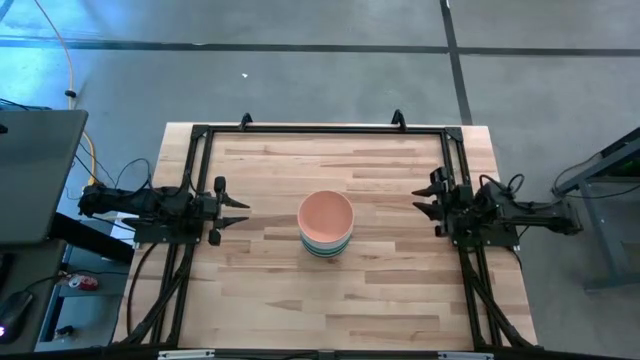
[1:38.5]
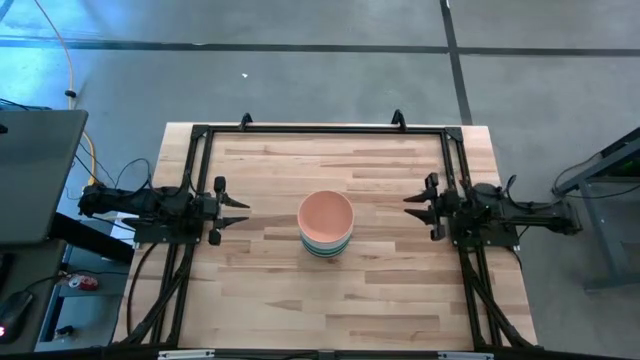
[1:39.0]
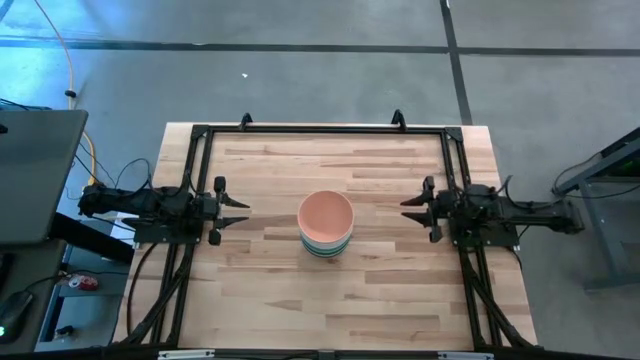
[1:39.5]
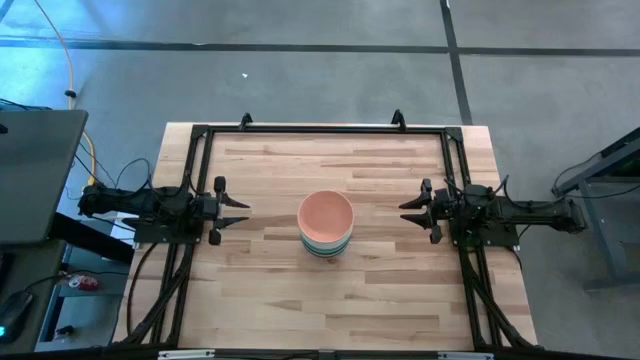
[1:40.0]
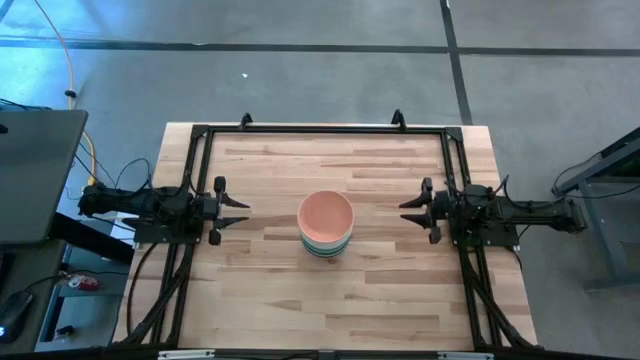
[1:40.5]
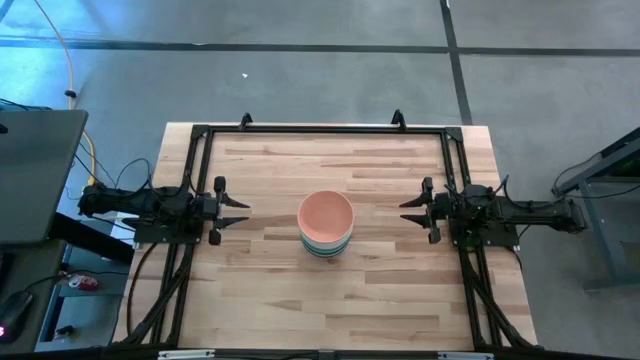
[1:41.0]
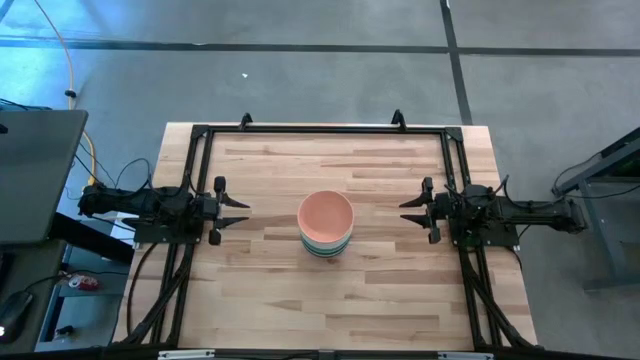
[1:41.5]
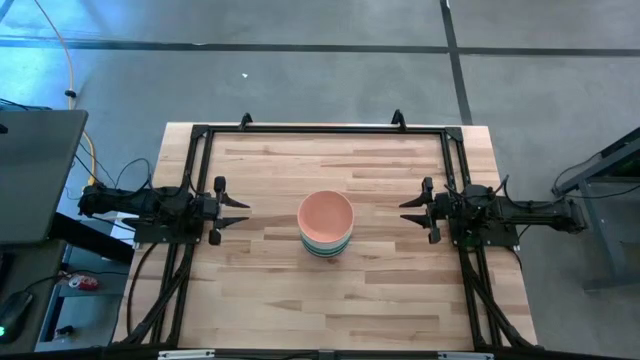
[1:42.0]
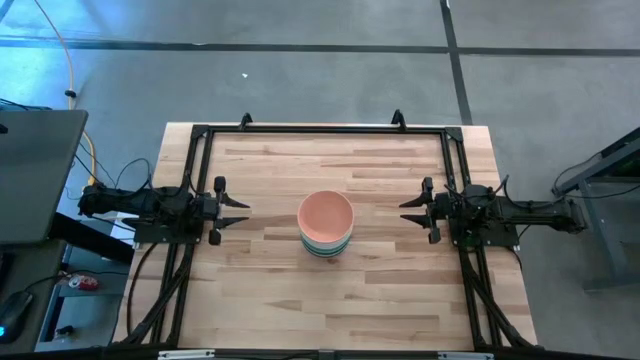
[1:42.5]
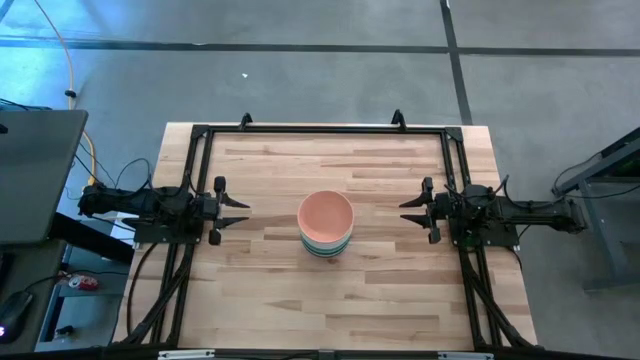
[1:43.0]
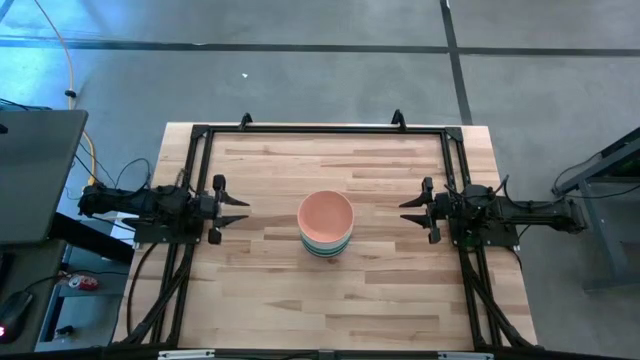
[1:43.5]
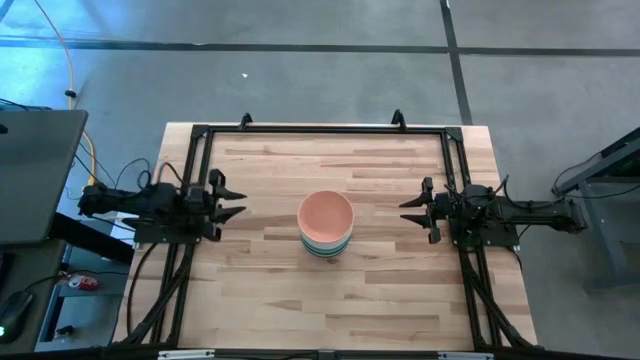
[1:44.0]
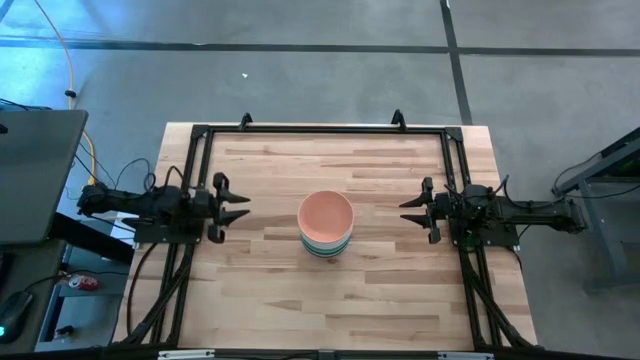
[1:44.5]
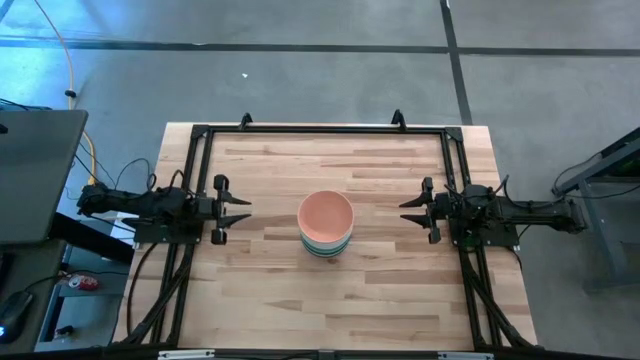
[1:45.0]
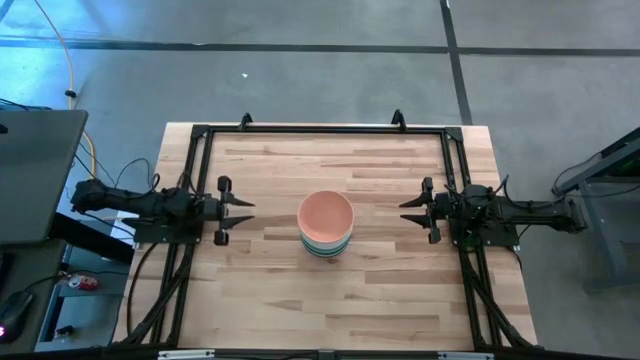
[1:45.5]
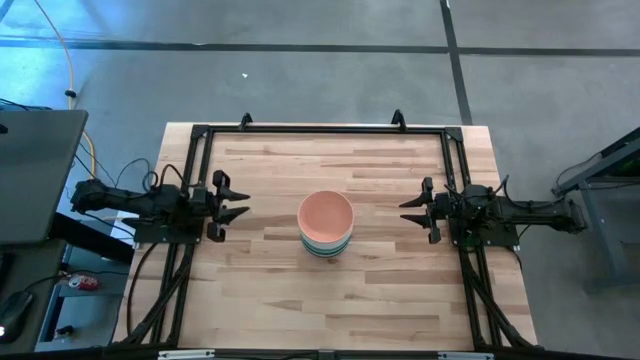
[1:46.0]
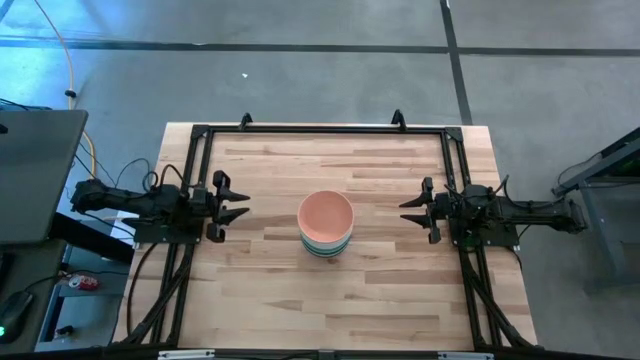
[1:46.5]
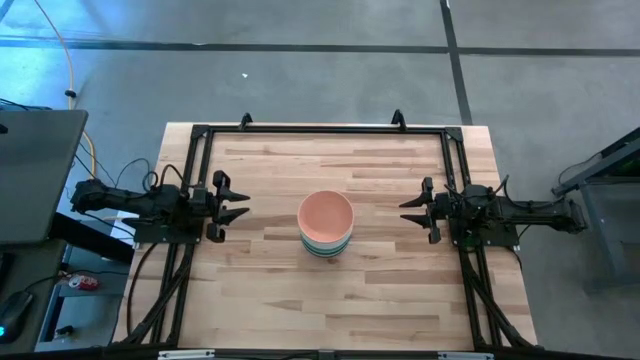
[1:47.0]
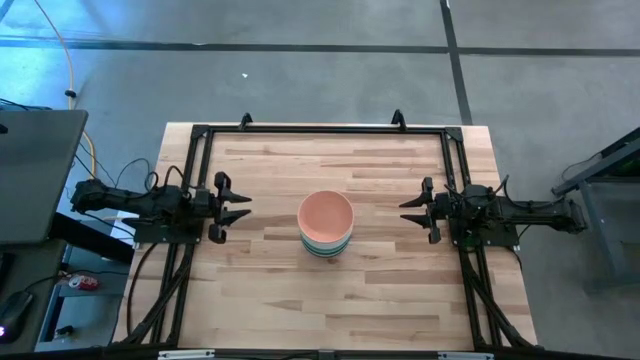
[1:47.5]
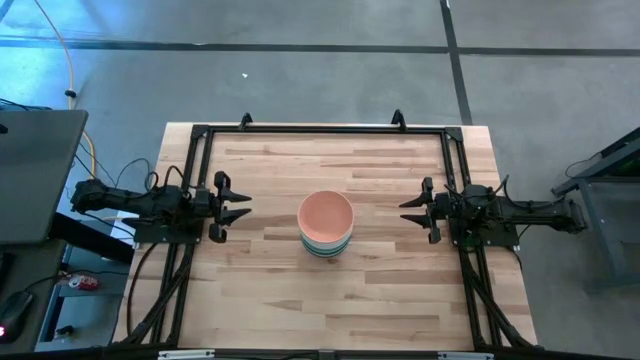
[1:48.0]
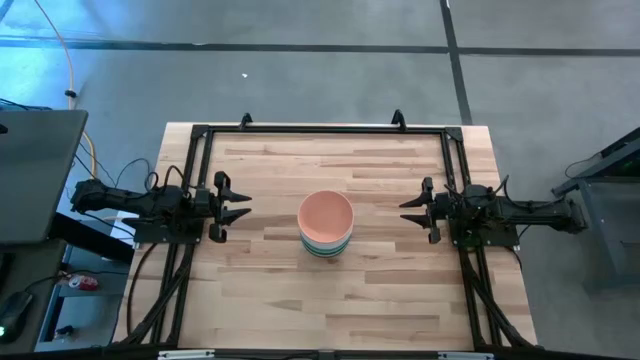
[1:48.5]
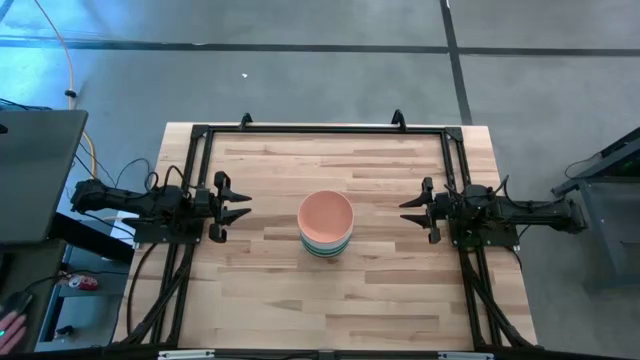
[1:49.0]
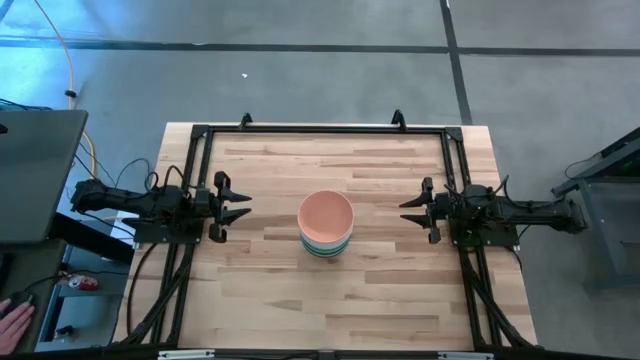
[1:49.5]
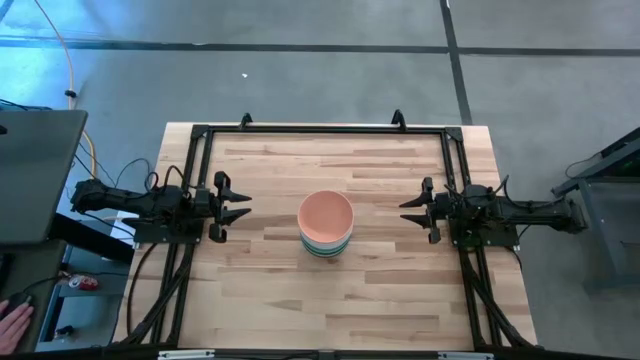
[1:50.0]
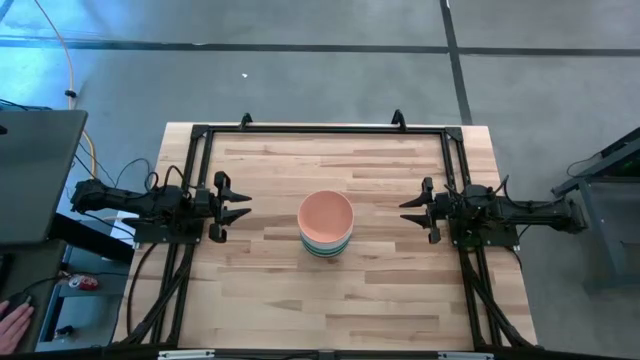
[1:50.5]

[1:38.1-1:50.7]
Task: Nest bowls inside each other
Return to Home Position

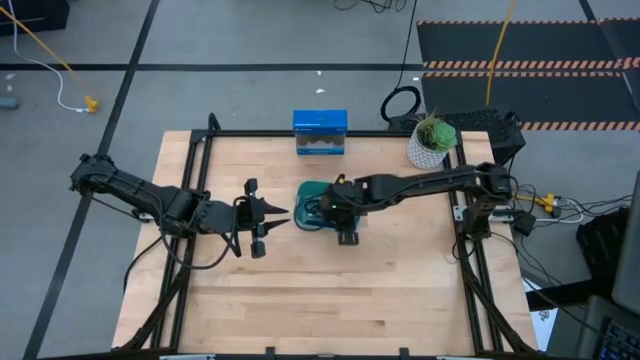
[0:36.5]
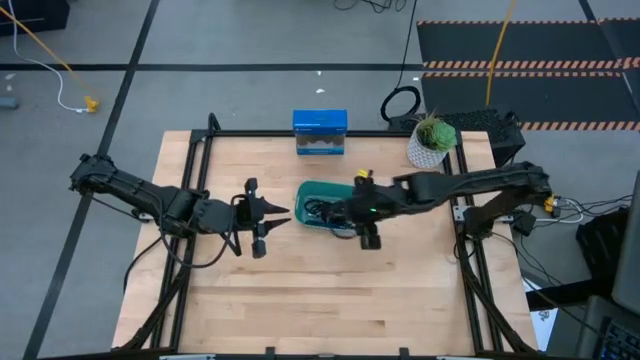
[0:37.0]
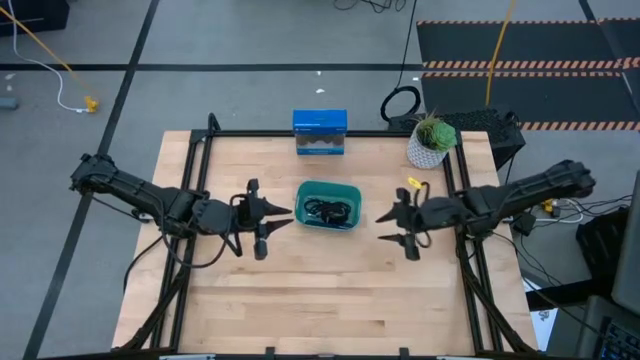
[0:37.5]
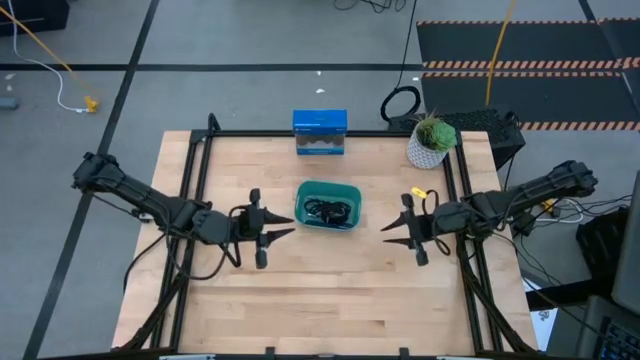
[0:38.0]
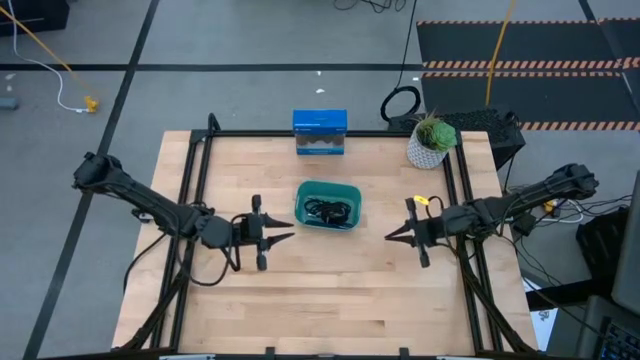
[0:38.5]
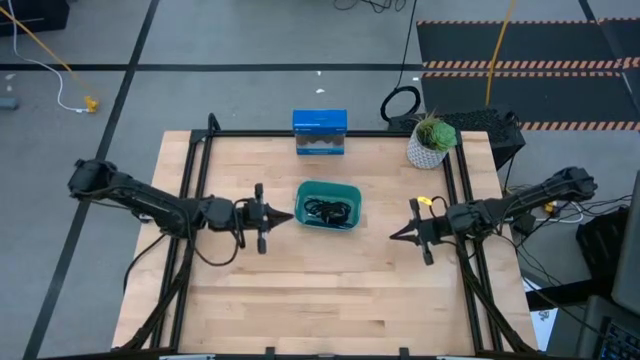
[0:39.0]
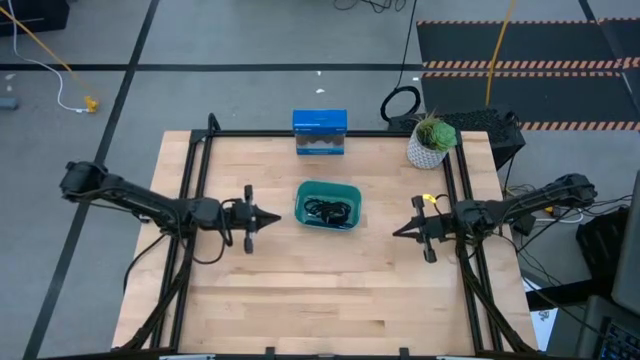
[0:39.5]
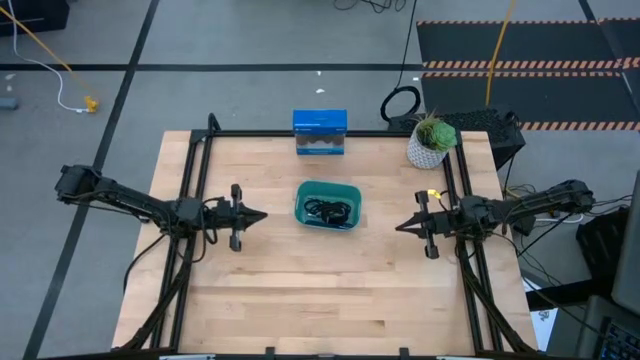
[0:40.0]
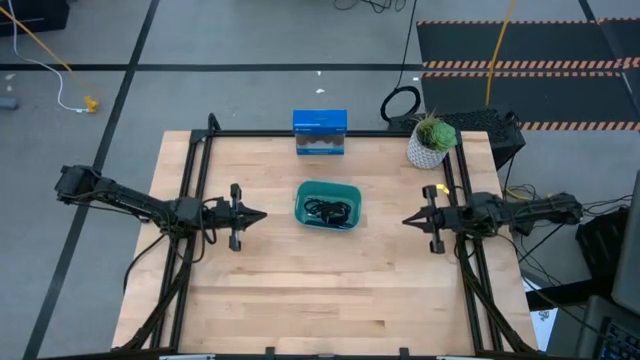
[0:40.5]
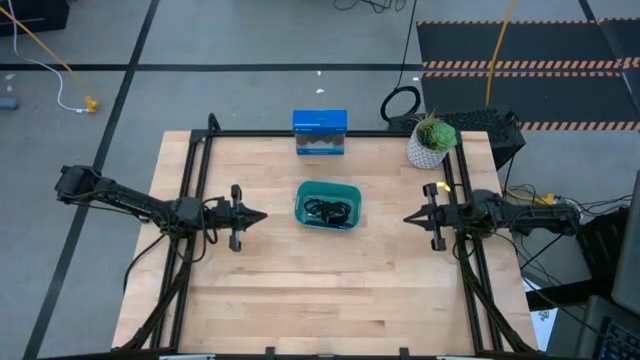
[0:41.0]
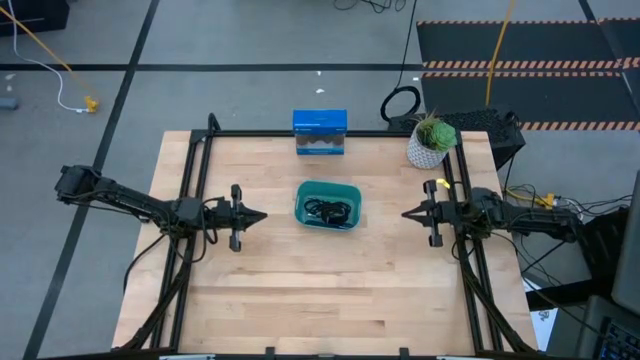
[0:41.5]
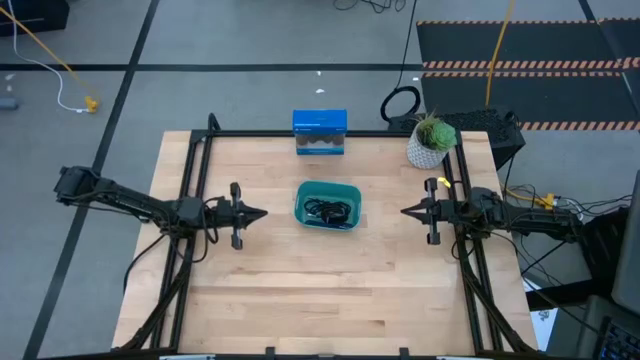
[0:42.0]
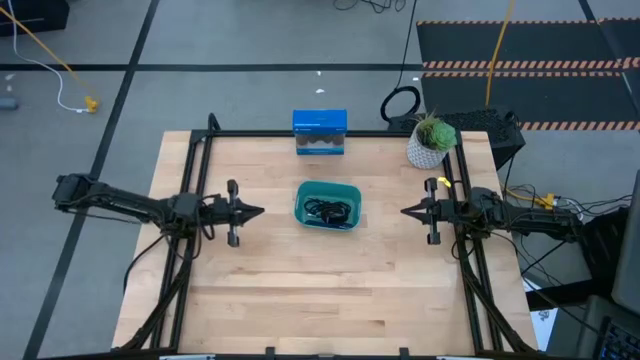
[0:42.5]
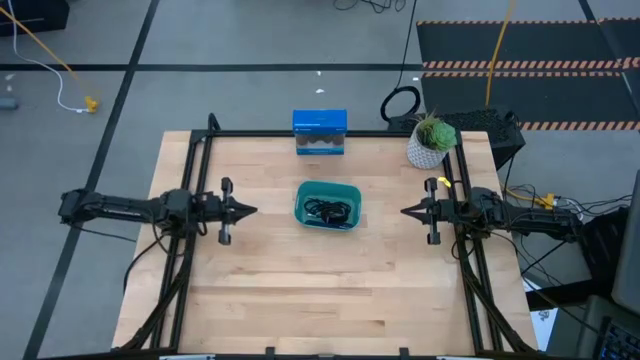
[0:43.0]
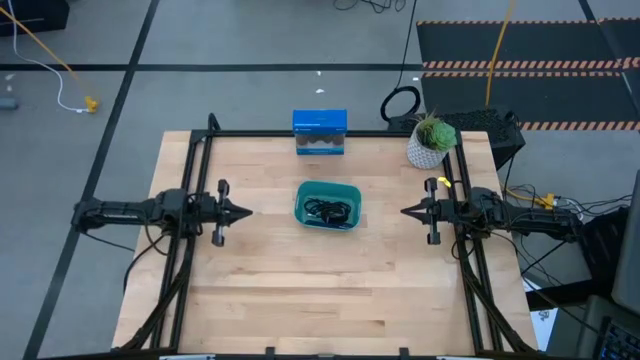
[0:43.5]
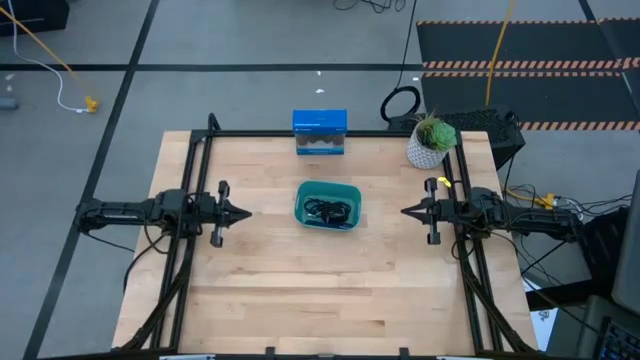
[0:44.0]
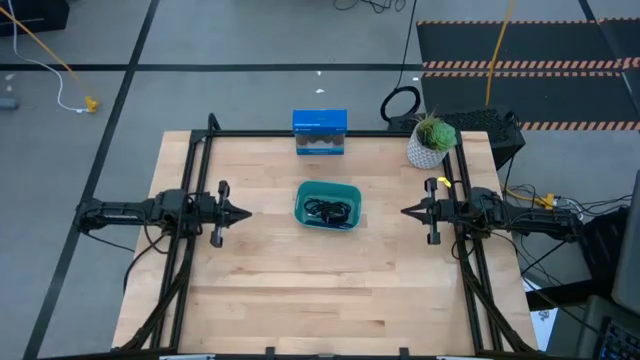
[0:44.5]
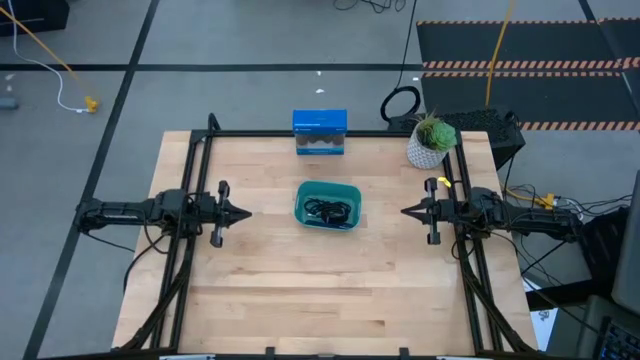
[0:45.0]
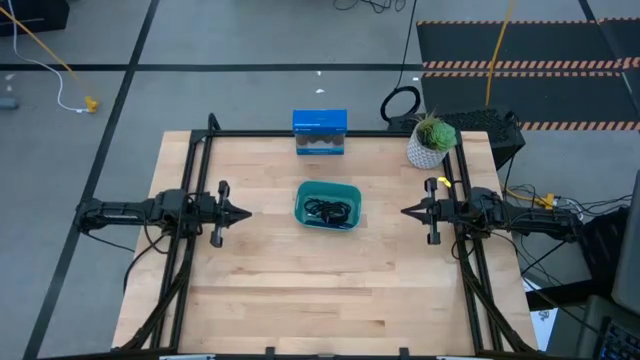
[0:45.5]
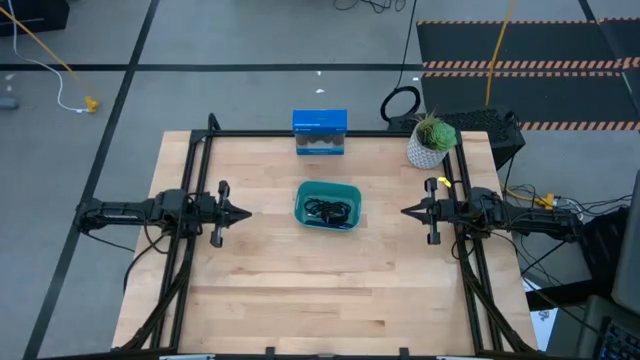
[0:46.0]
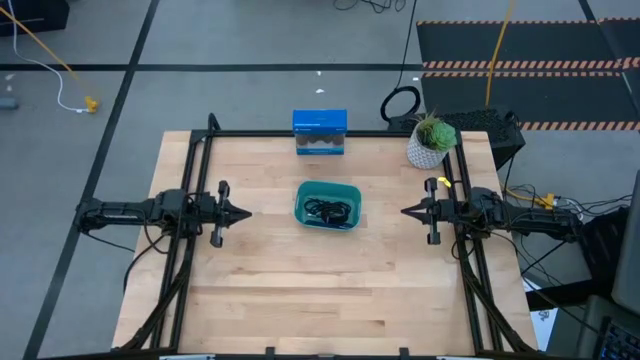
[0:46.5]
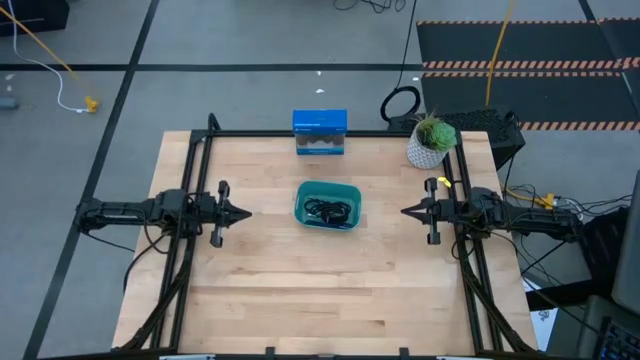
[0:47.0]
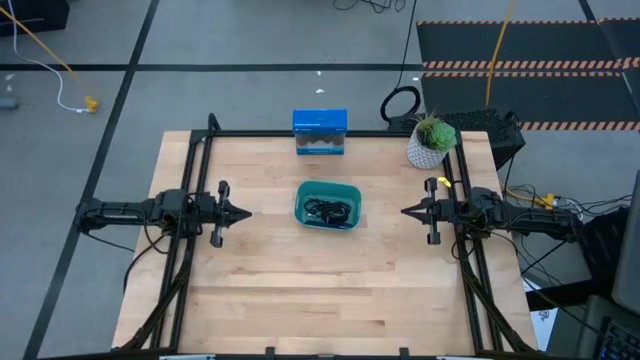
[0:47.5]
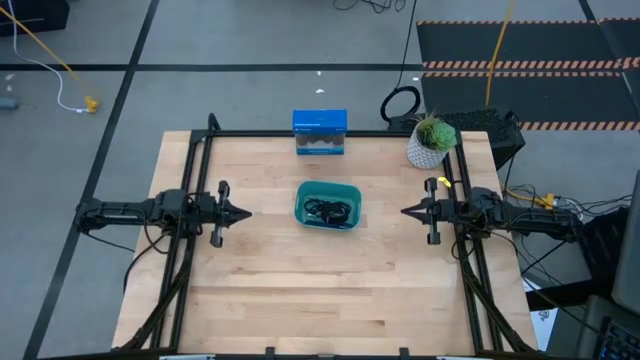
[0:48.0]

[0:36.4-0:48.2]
Task: Pick and place USB-C Cables
Return to Home Position
